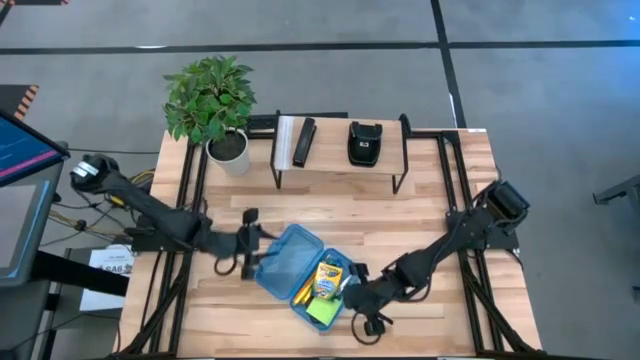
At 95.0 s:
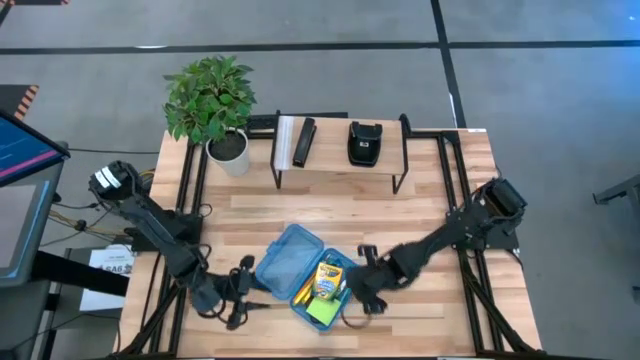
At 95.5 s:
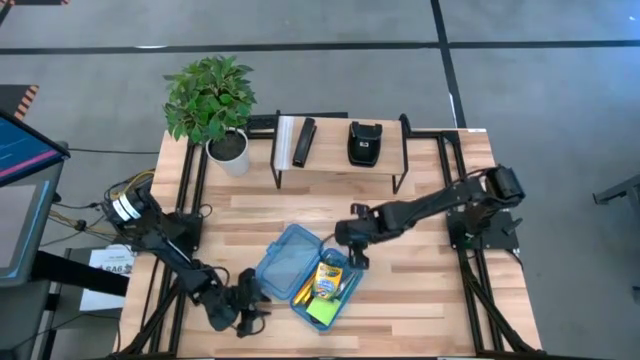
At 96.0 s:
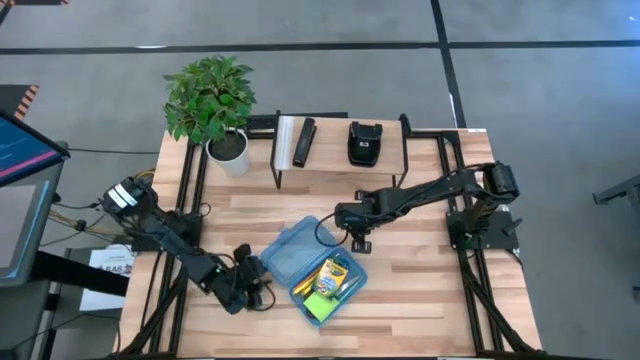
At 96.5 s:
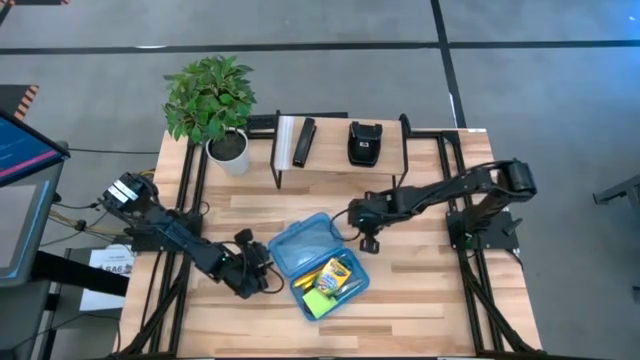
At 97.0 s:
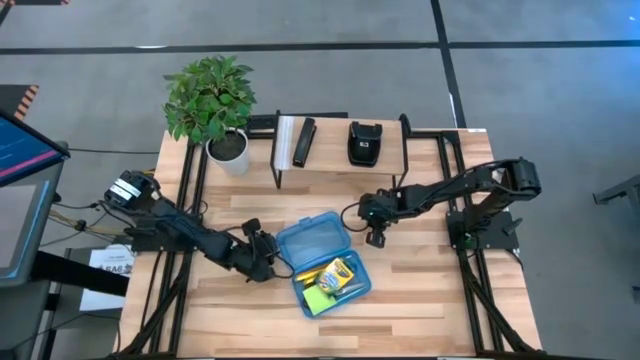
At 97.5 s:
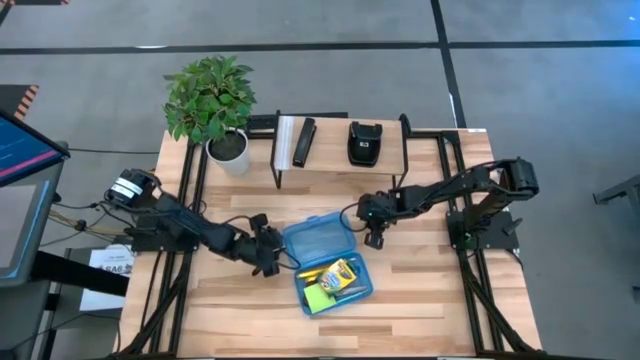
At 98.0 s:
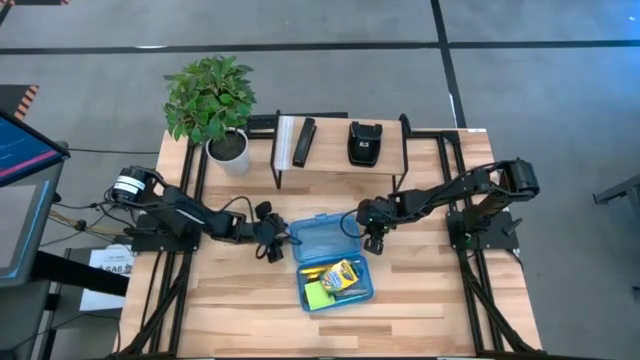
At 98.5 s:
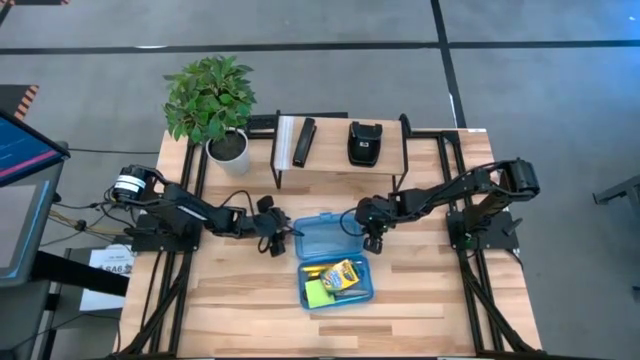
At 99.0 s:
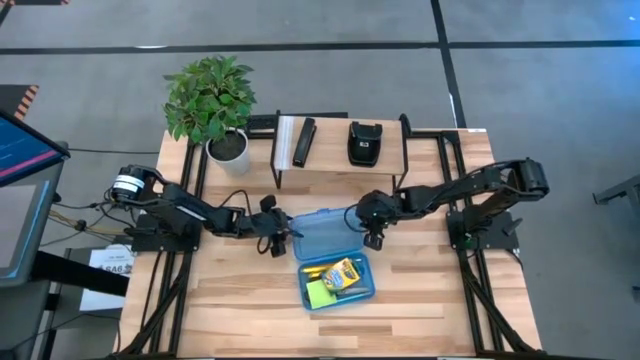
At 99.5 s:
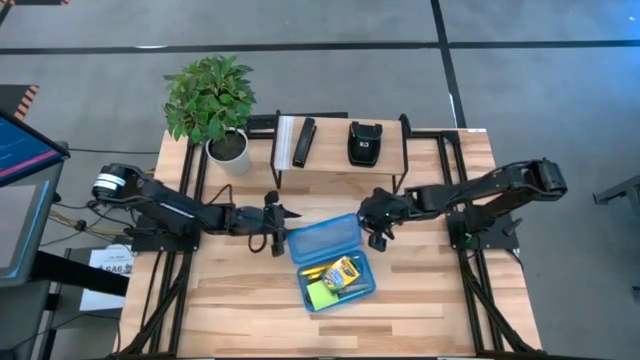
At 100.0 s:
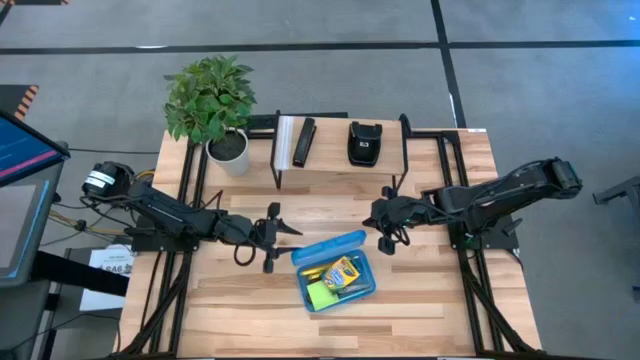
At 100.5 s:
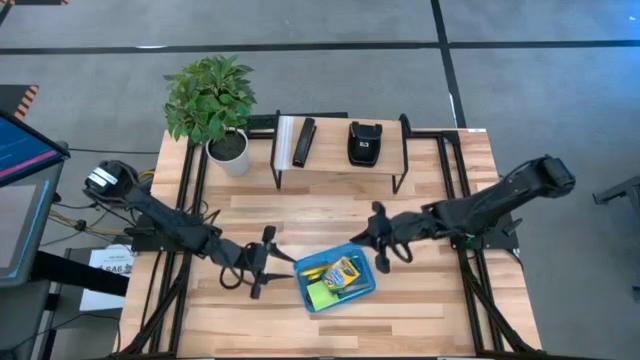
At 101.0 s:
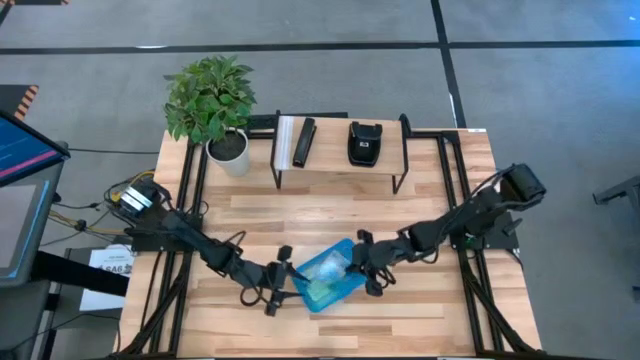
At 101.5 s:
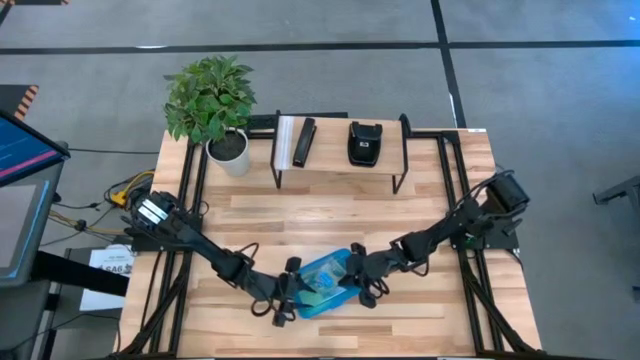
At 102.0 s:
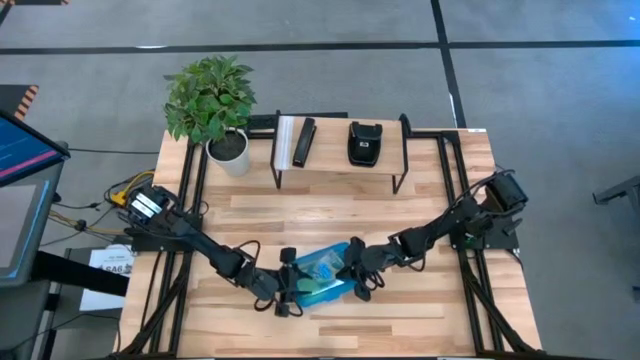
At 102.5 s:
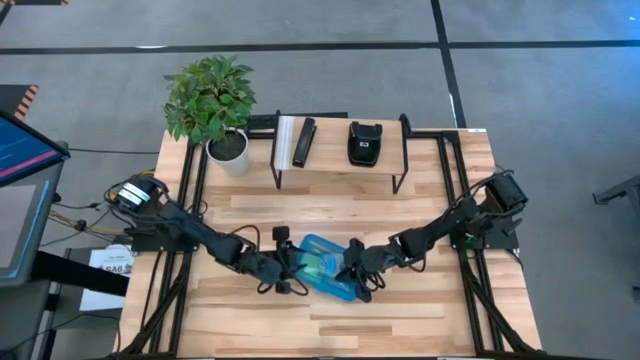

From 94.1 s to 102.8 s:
Task: Pack school essentials
Close the supply box

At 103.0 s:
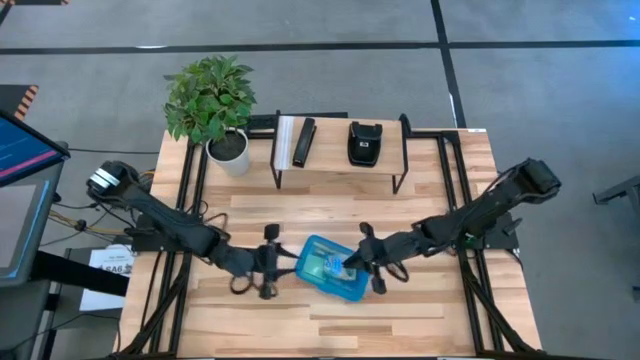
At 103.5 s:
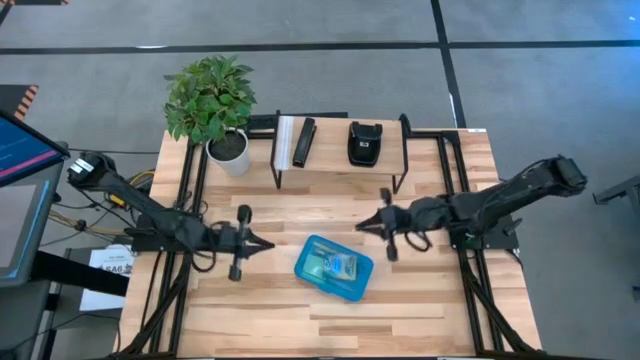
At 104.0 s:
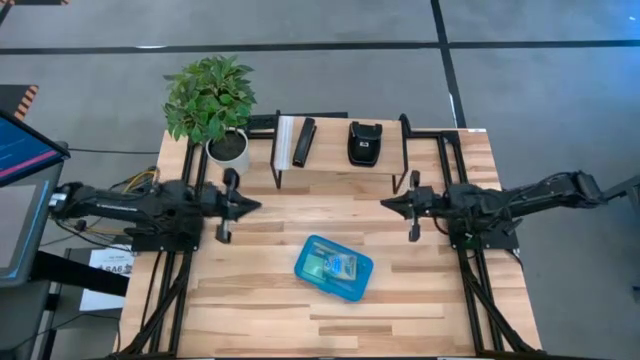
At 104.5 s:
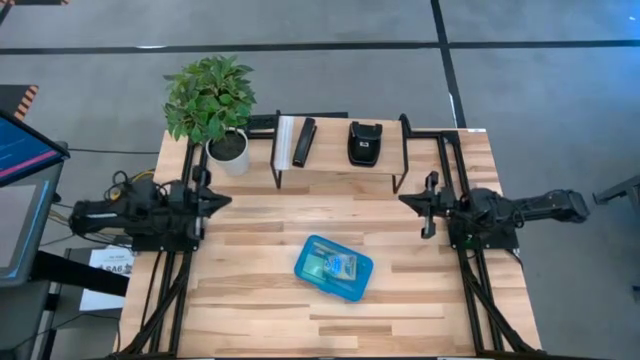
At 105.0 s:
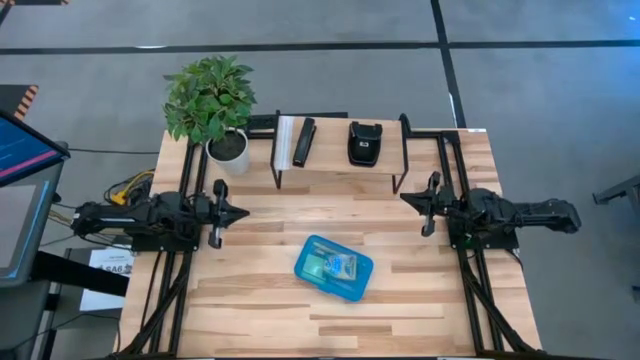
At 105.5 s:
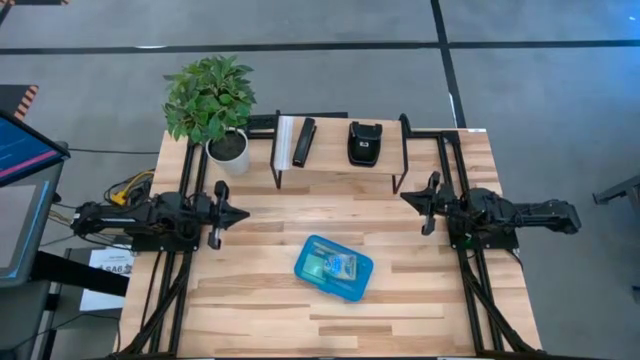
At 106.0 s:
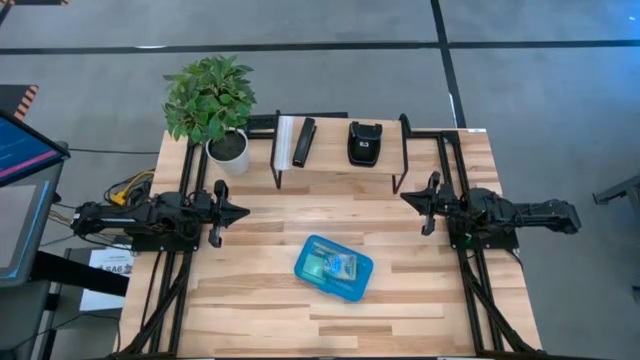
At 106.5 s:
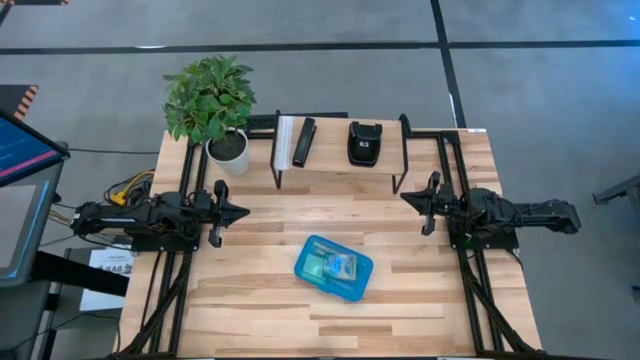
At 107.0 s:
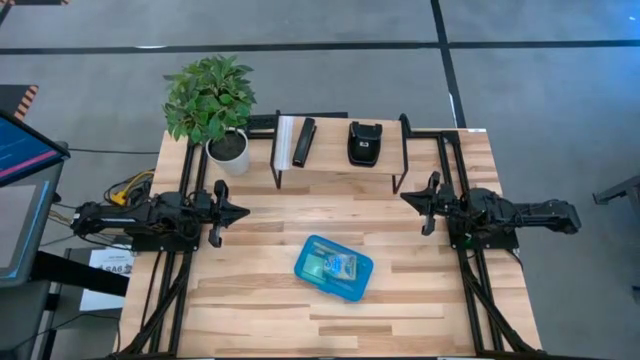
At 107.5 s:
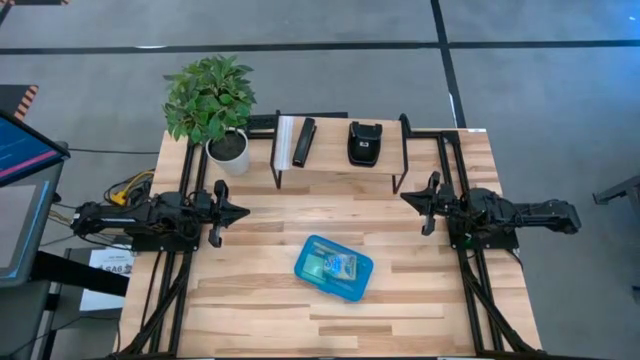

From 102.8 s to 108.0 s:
Return to Home Position

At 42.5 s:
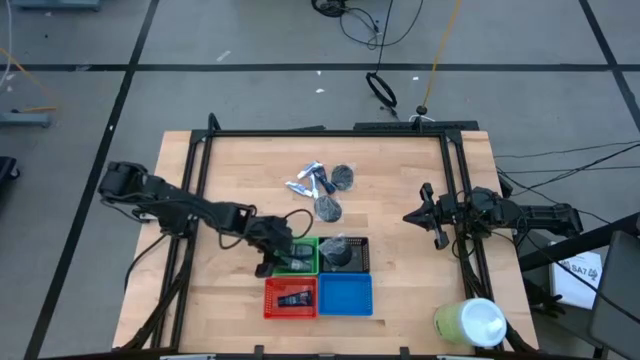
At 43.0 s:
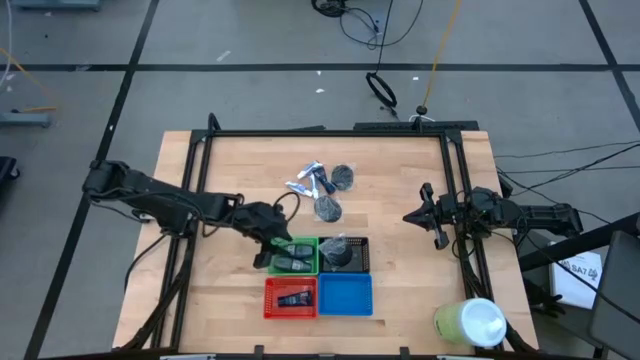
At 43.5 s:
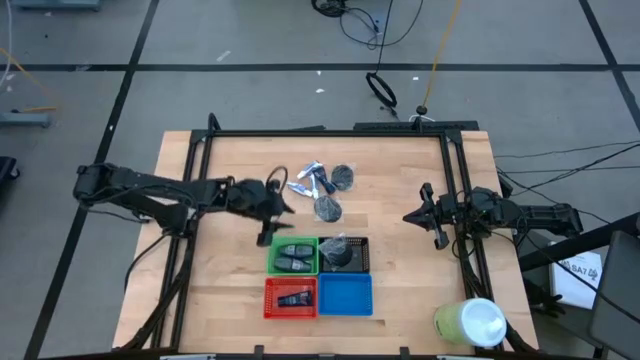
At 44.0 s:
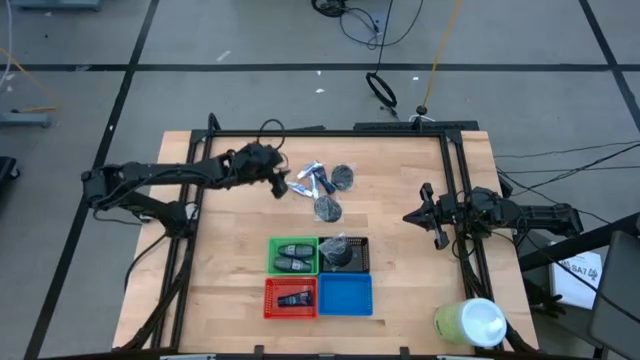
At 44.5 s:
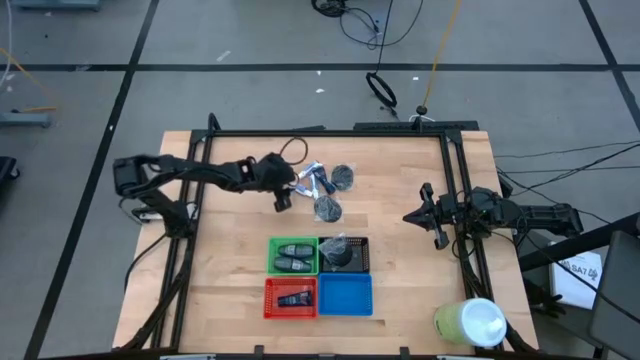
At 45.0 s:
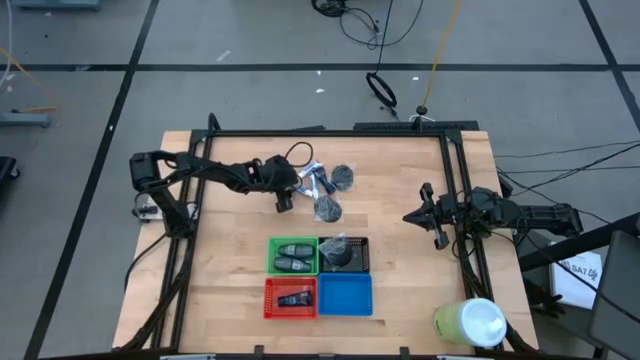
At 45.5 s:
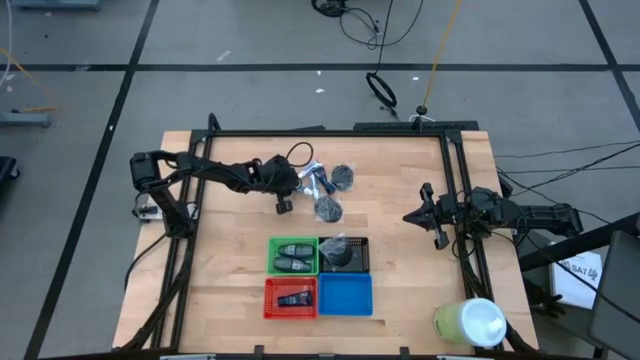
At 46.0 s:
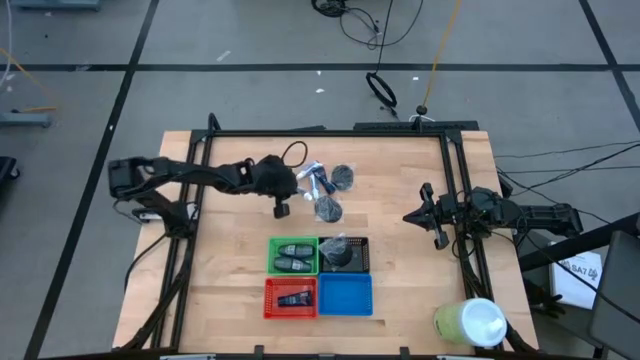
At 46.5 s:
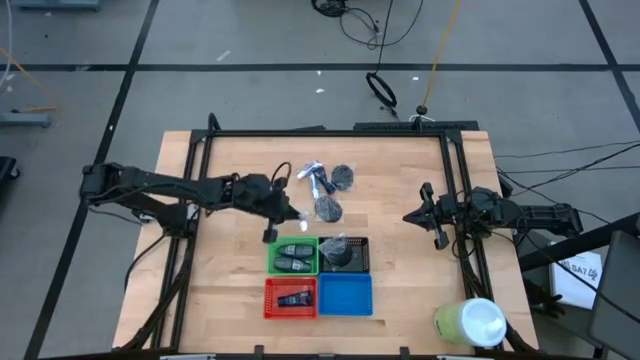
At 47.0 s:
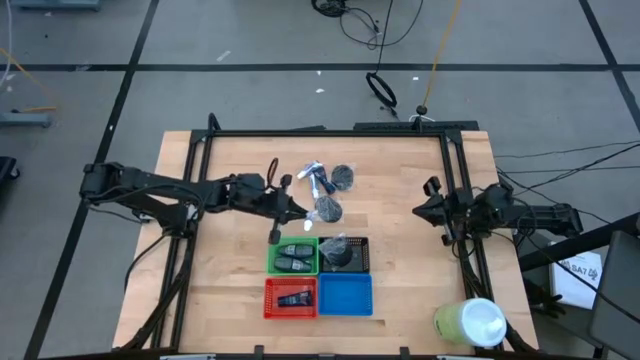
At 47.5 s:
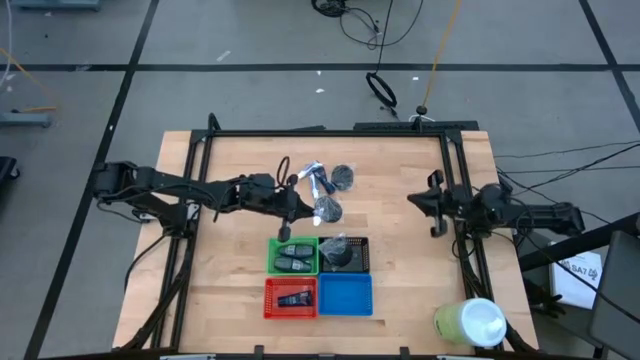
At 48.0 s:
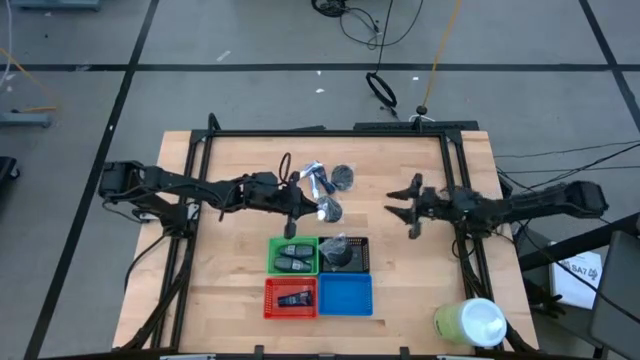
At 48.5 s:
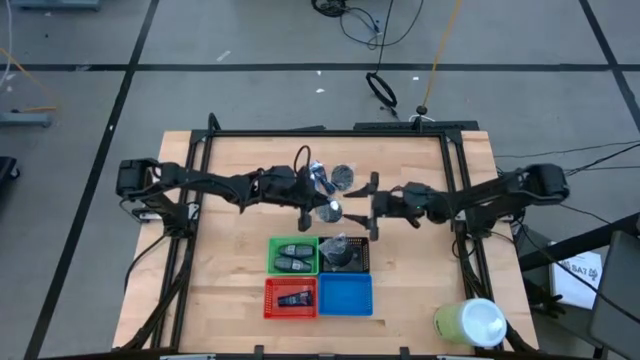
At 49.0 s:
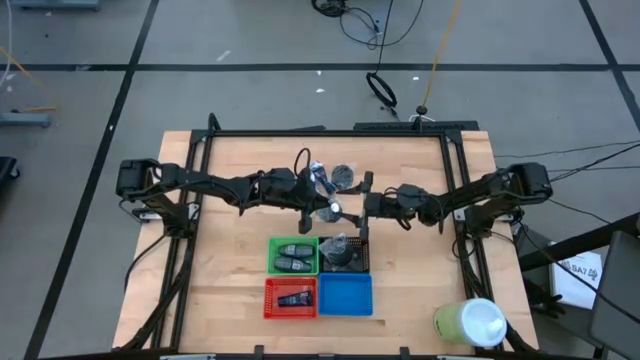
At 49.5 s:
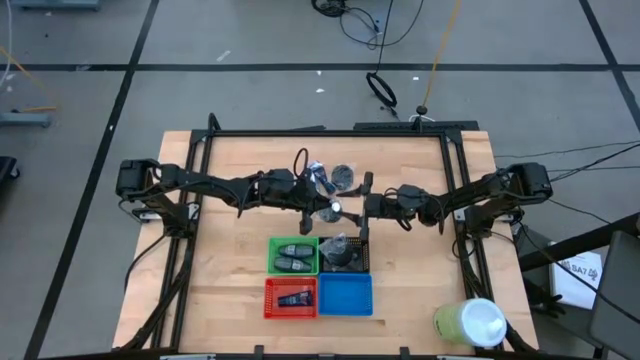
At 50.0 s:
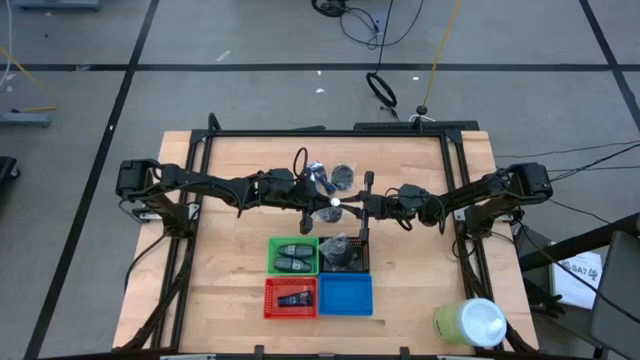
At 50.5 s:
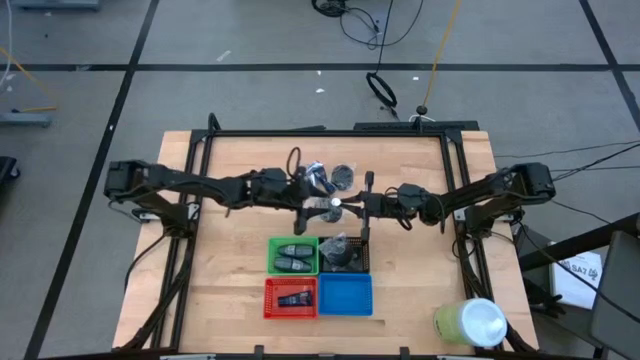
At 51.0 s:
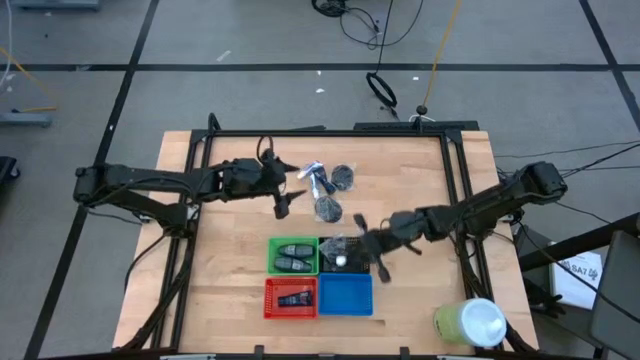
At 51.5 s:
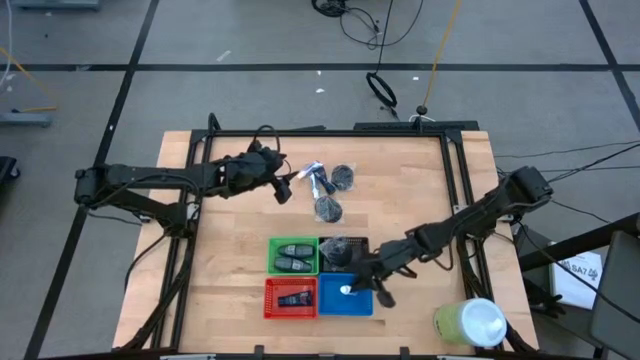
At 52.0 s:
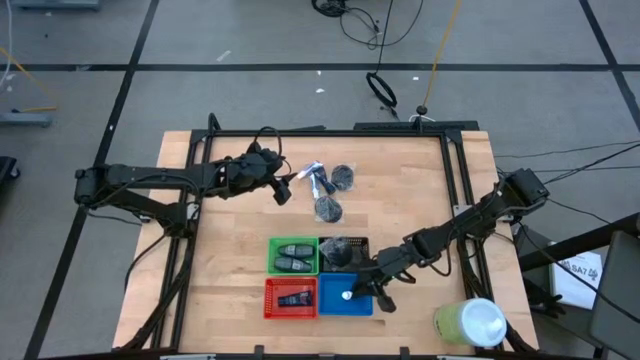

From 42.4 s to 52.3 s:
Task: Pick & Place Travel size toiletries
Put the bottom left white toothpaste into the blue bin
